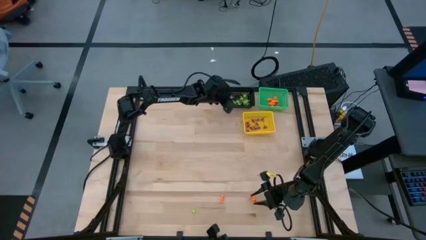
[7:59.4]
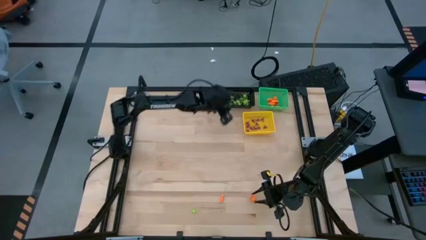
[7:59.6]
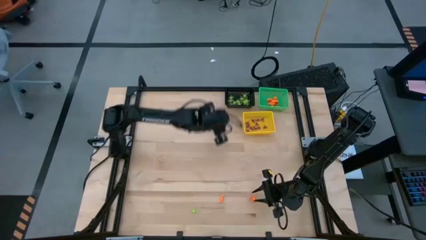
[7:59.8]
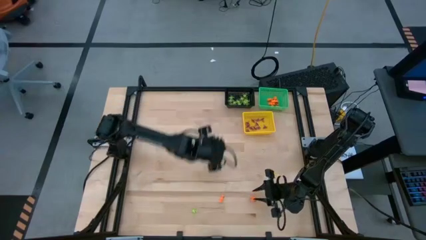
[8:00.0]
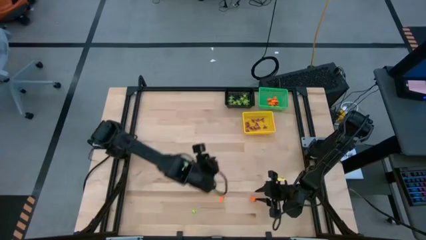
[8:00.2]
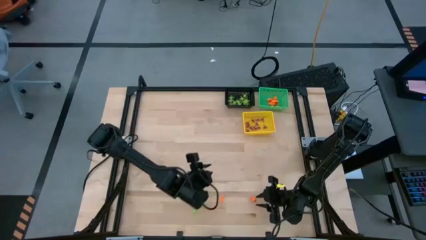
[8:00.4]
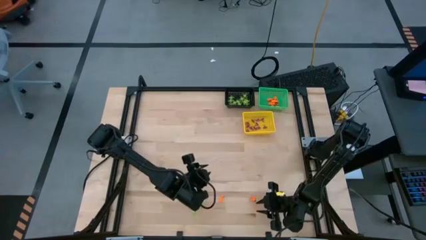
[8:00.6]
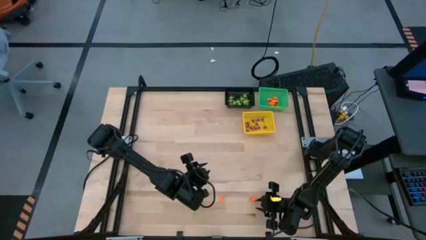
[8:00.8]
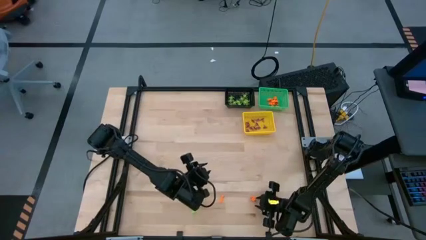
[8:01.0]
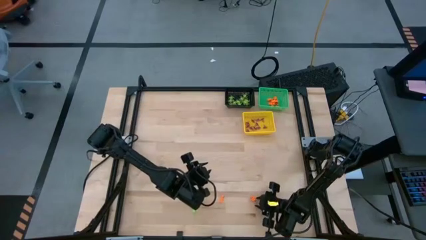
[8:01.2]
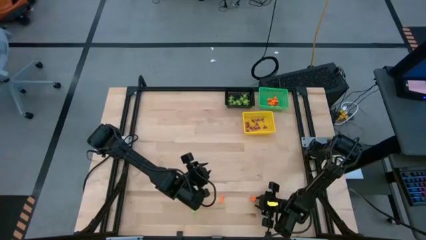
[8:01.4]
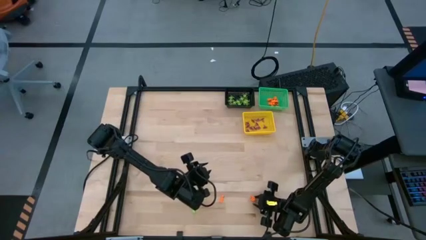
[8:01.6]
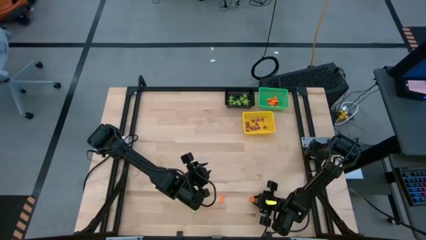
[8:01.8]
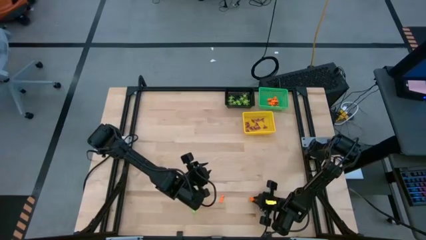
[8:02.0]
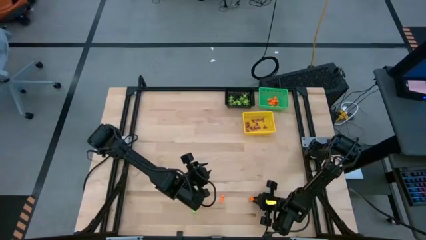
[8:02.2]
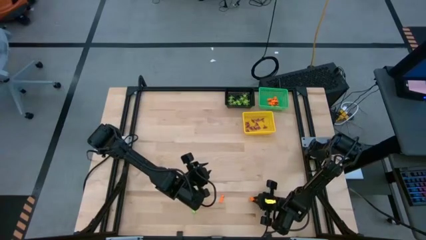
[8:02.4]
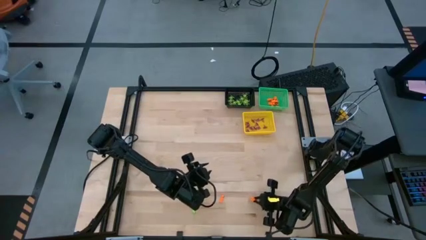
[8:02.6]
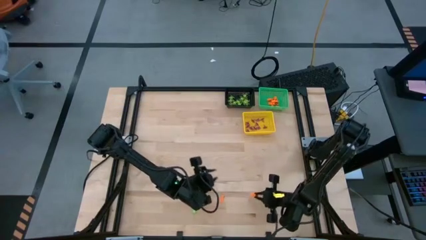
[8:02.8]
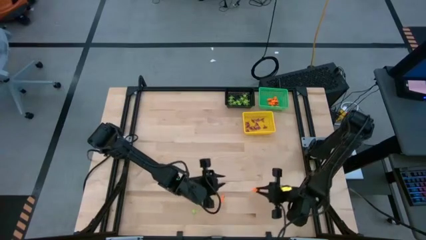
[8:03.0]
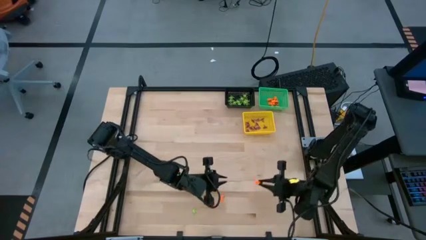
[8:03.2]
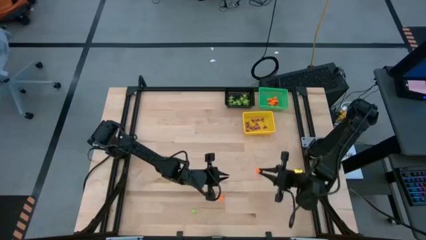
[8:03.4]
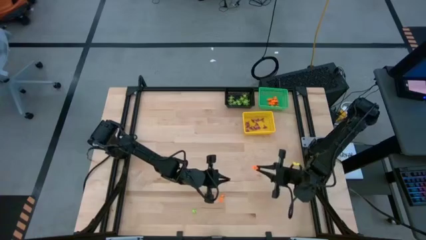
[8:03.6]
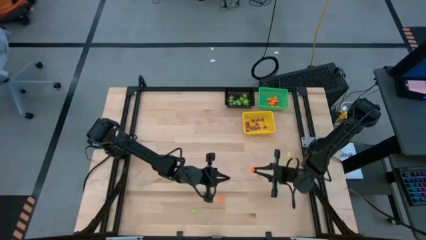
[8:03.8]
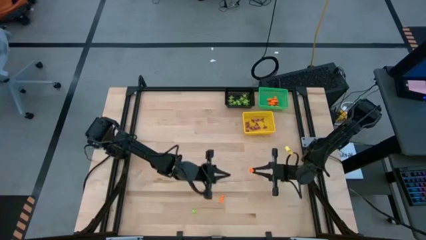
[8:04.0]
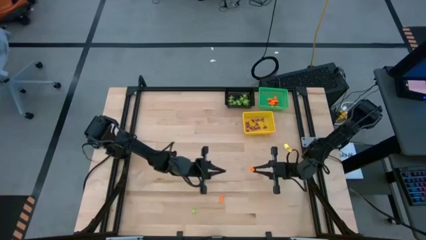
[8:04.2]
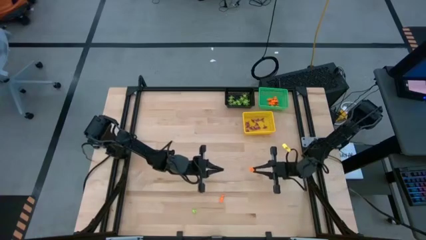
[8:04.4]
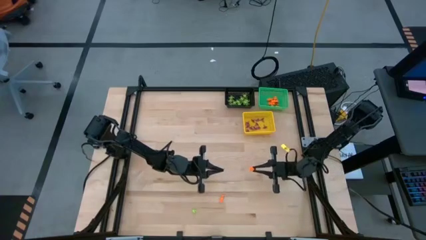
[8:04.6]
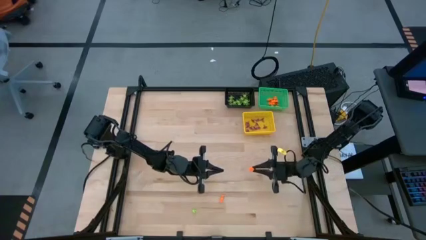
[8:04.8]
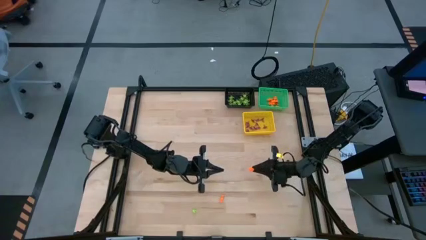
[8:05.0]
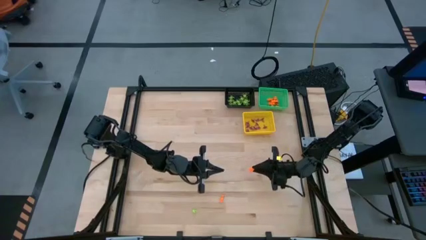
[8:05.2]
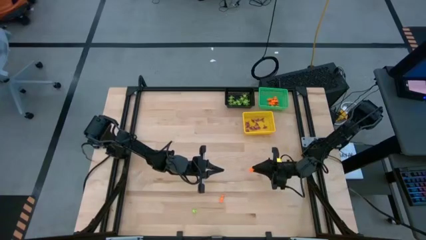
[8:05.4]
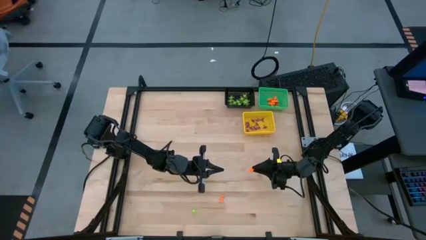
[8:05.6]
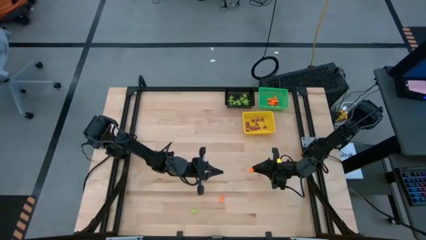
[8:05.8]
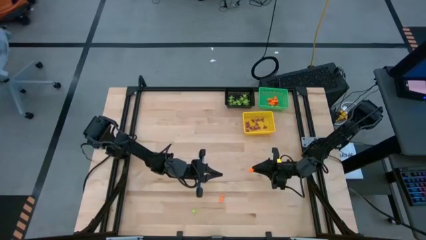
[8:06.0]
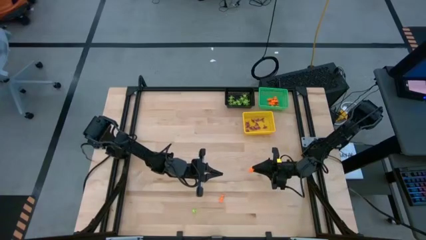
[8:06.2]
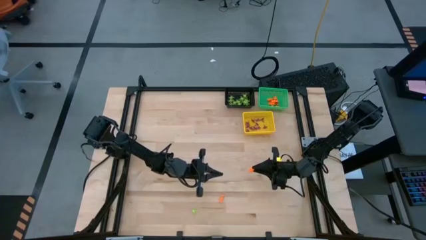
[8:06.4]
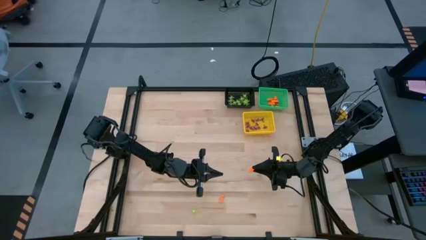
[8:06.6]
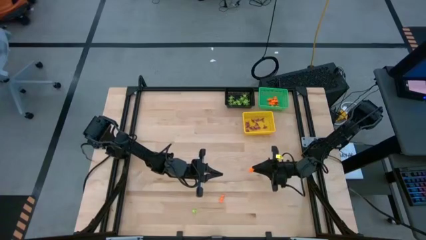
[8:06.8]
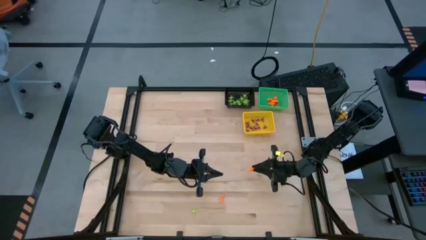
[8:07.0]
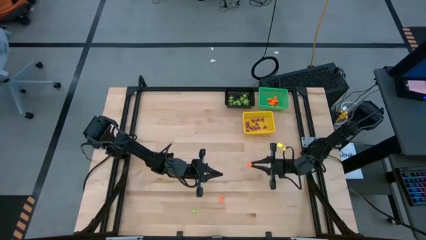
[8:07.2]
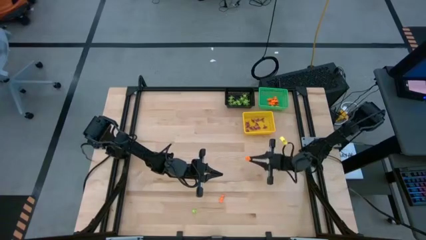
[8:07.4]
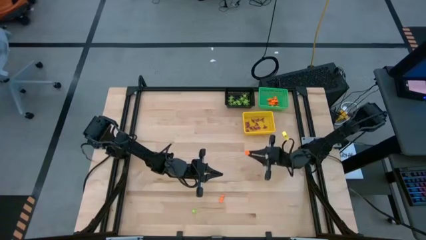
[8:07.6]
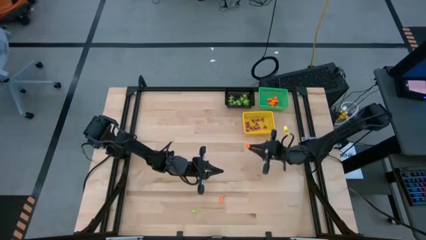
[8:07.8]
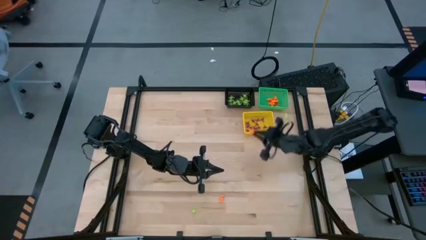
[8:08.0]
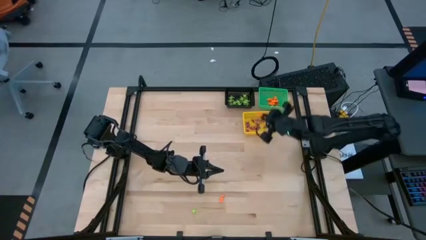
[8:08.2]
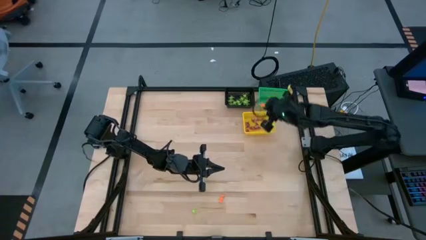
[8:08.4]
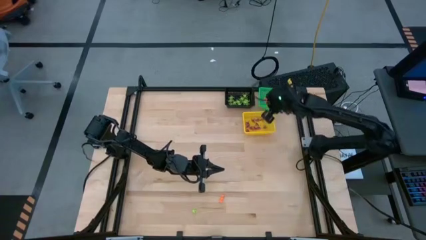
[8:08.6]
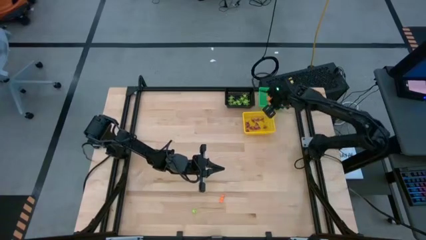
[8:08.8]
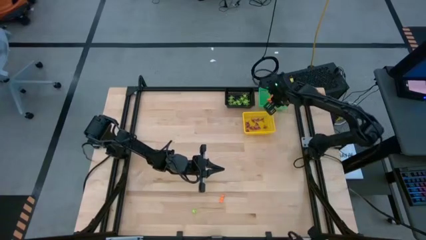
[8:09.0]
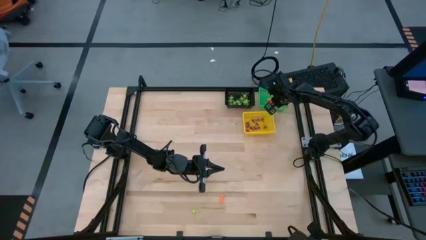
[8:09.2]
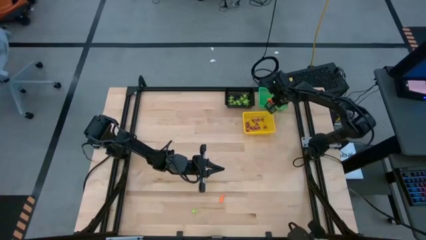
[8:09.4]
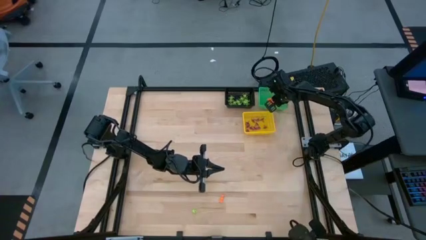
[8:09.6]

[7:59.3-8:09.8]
Task: Sort Halloween decoration
Put the orange skeleton toy into the green basket

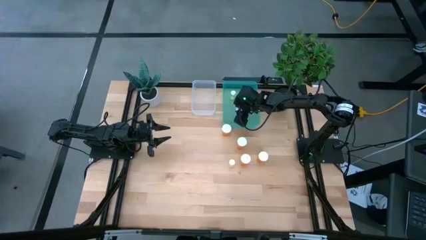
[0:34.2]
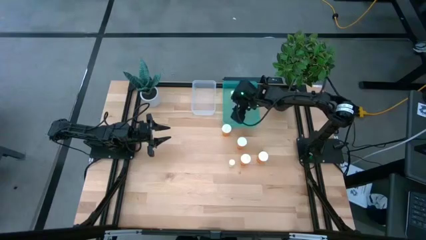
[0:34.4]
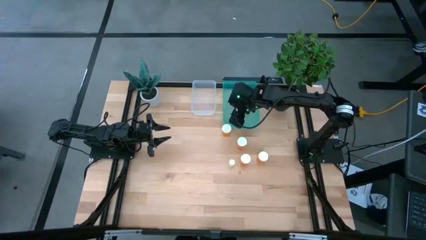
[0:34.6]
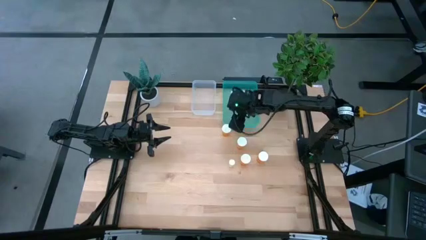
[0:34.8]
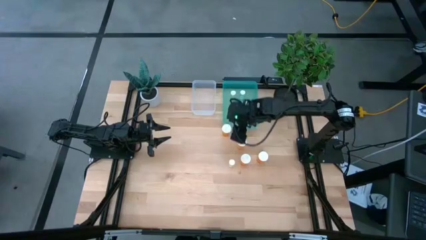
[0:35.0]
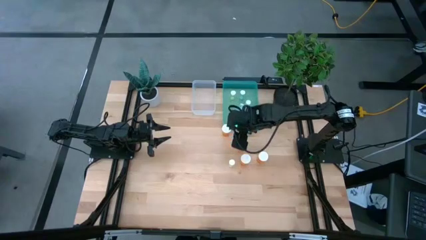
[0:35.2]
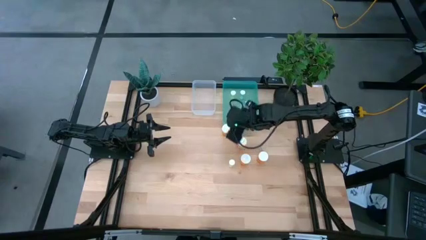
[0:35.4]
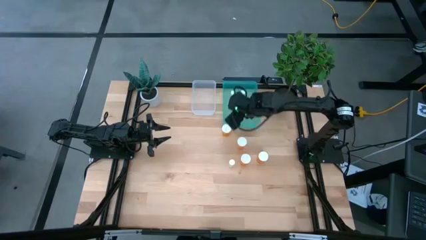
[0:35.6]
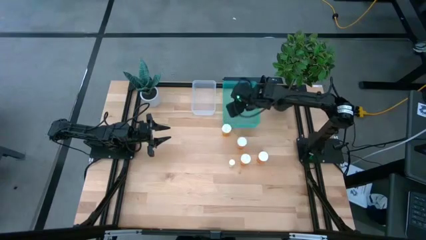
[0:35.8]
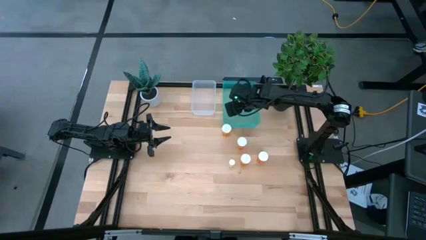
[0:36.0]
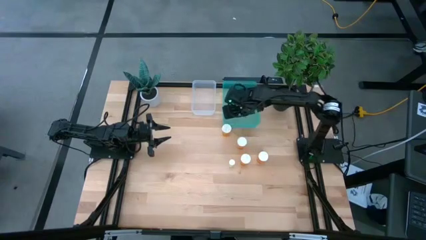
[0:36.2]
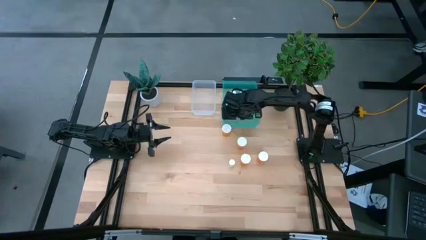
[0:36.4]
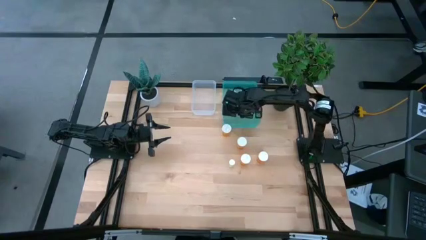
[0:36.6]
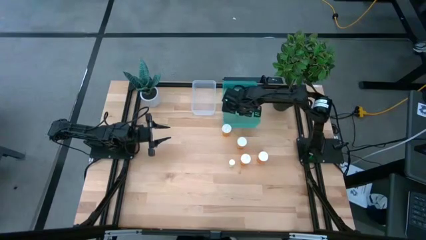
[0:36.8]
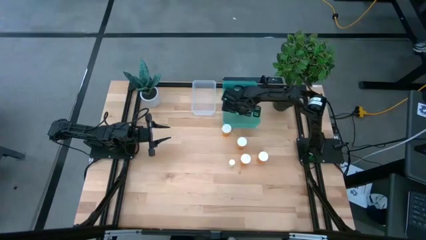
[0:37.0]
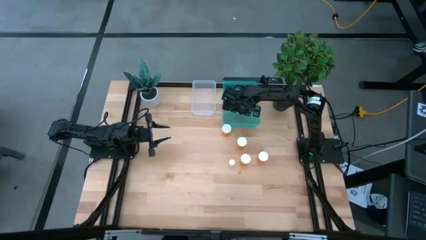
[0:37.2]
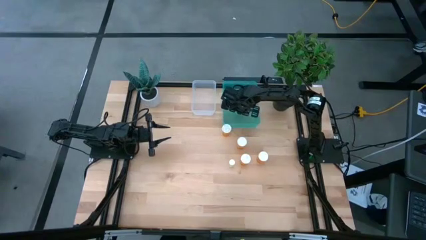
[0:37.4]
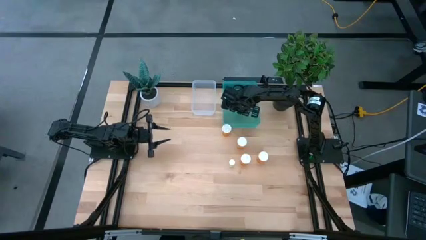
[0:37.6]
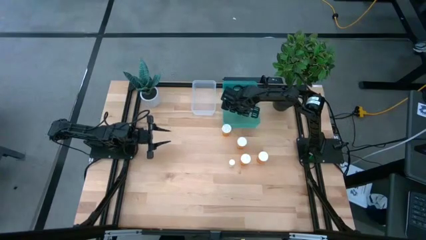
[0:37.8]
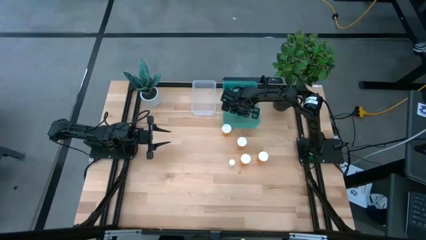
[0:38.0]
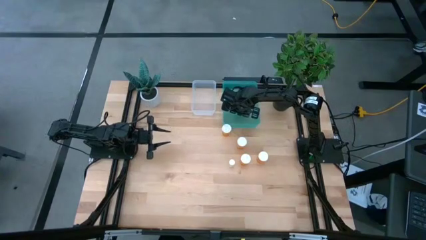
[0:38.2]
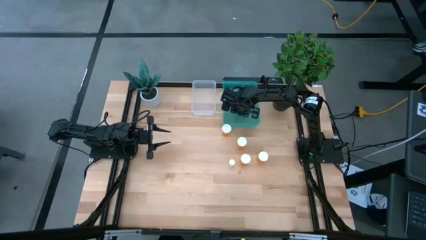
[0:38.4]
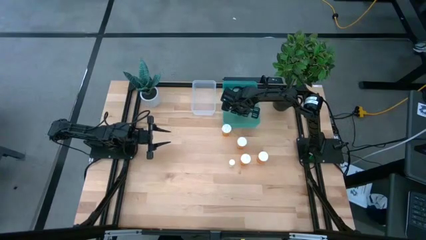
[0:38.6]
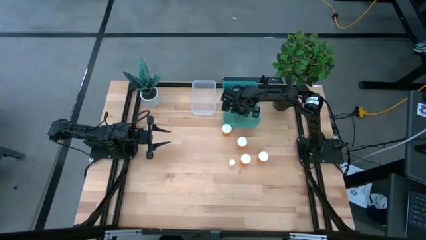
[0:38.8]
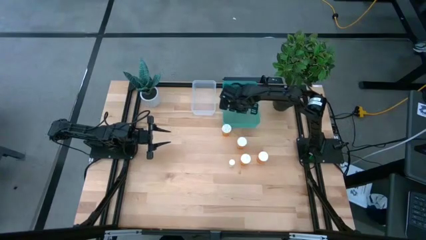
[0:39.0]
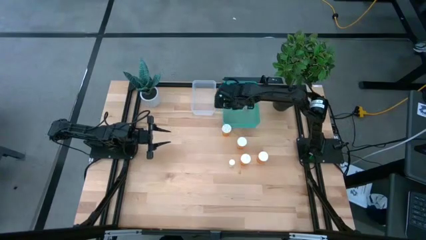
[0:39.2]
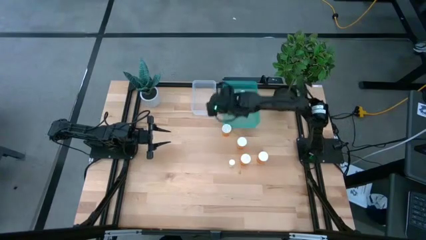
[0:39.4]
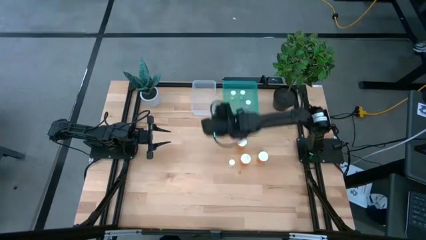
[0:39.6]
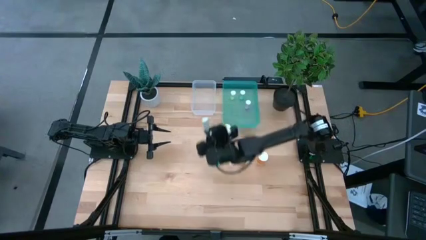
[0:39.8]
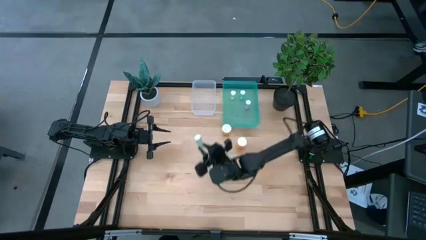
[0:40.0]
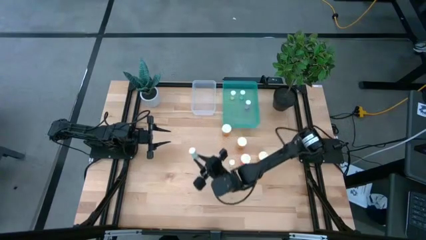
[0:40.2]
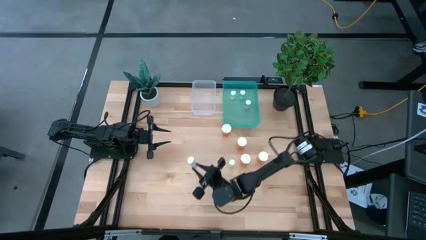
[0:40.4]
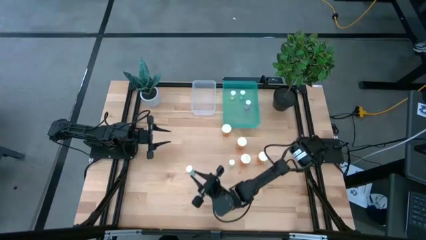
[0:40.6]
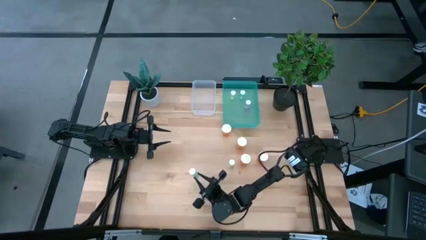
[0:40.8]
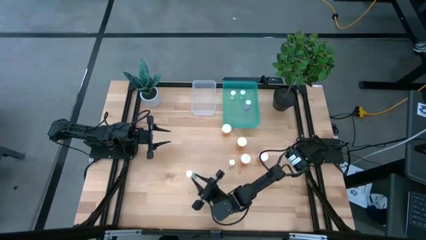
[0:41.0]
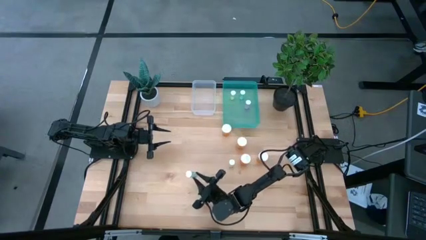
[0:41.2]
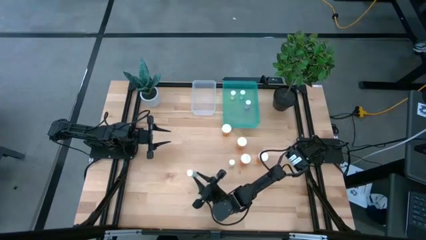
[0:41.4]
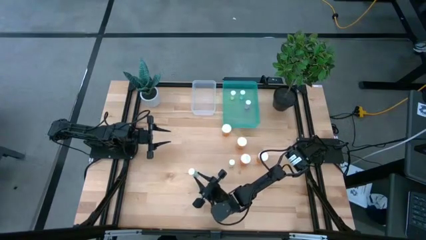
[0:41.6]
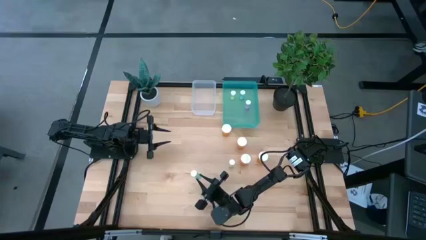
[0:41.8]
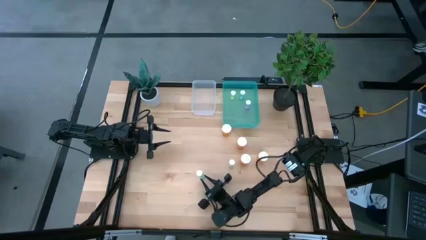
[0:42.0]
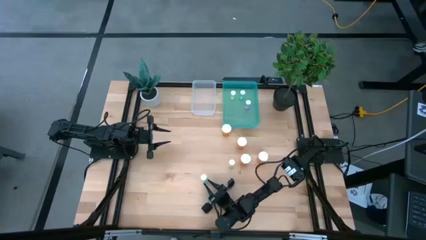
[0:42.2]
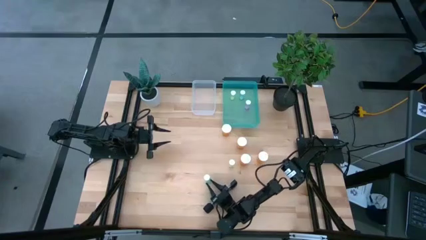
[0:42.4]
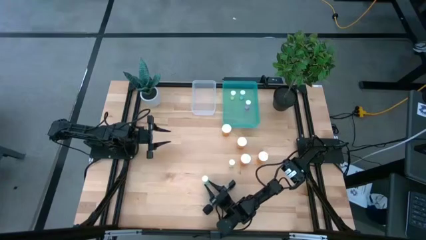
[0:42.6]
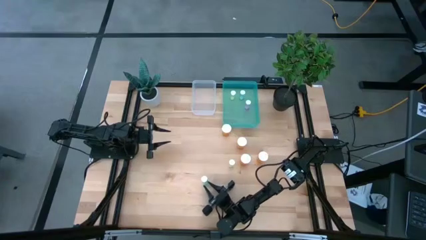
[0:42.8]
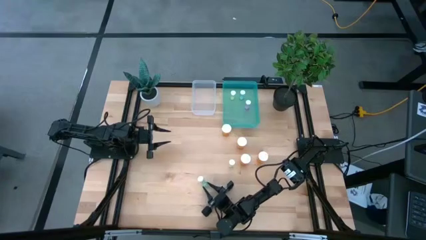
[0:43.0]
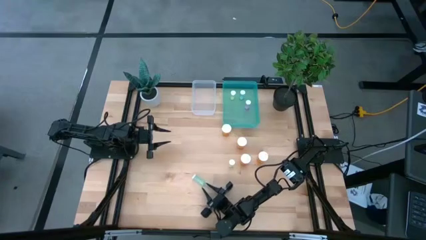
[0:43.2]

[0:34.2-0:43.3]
Task: Pick and place medicine bottles into bin by pill shape (circle, oval)
Remove the blue tablet bottle from the blue bin
